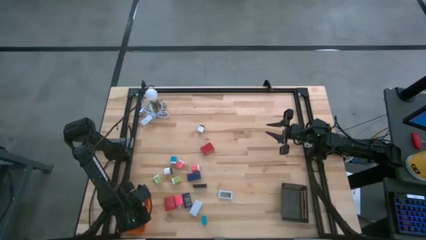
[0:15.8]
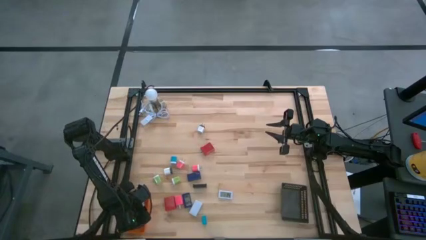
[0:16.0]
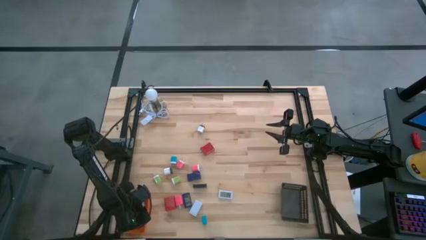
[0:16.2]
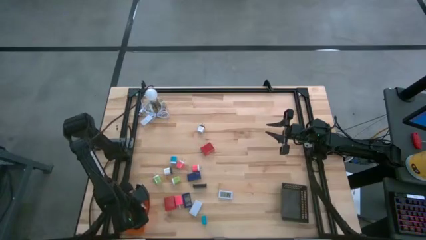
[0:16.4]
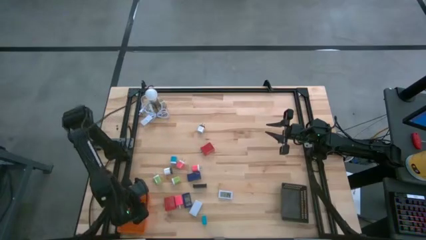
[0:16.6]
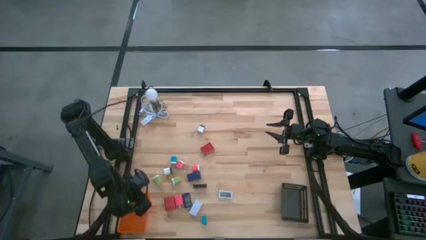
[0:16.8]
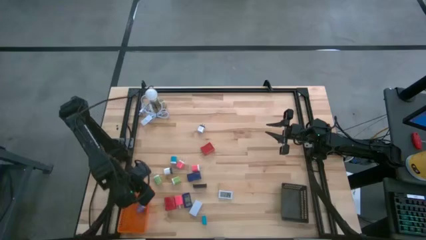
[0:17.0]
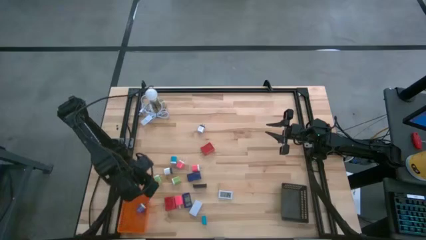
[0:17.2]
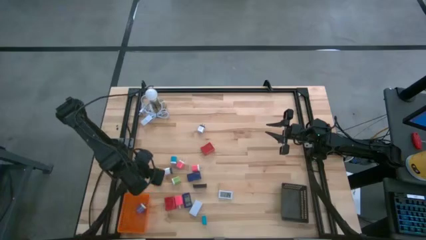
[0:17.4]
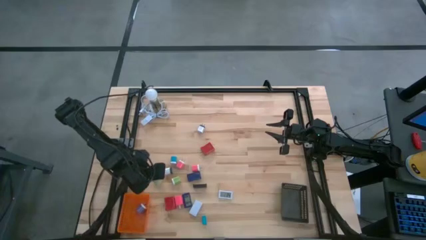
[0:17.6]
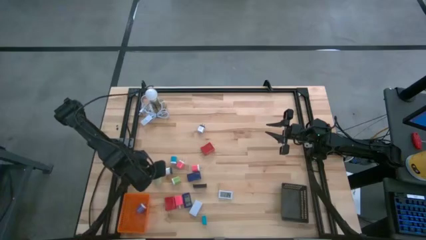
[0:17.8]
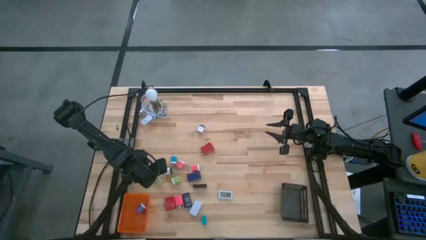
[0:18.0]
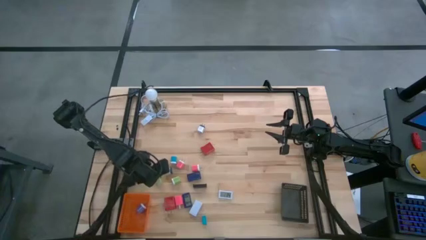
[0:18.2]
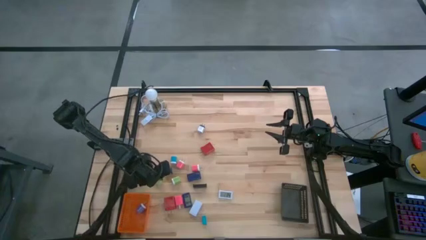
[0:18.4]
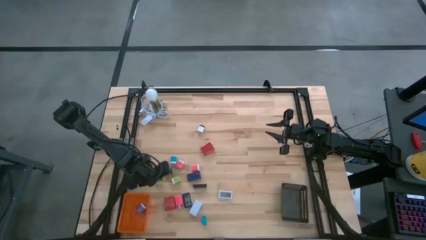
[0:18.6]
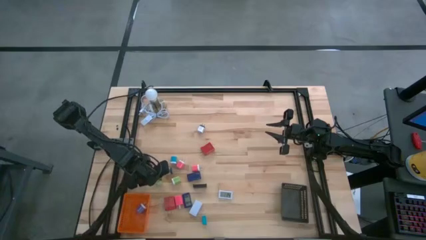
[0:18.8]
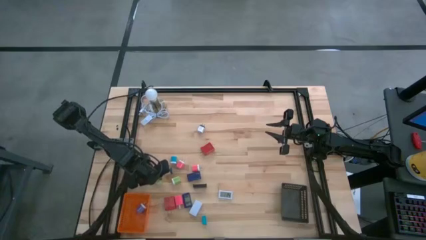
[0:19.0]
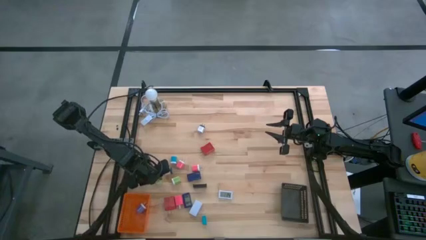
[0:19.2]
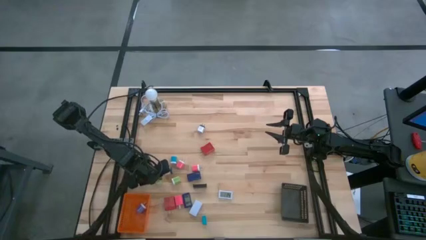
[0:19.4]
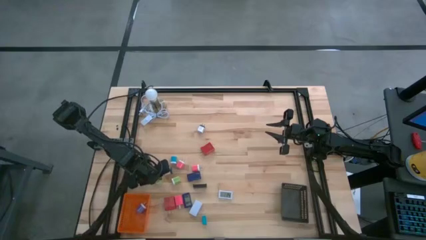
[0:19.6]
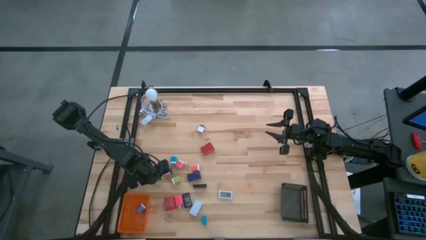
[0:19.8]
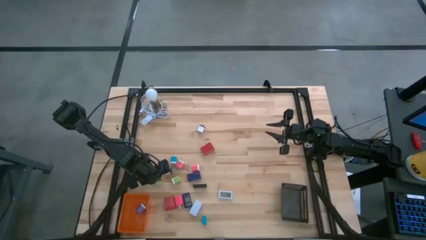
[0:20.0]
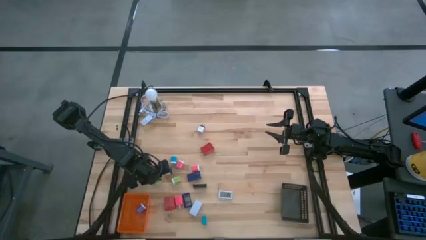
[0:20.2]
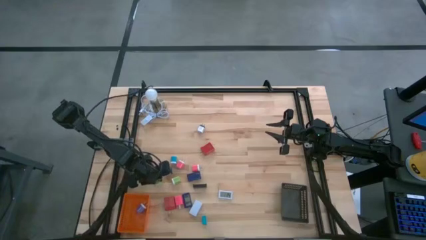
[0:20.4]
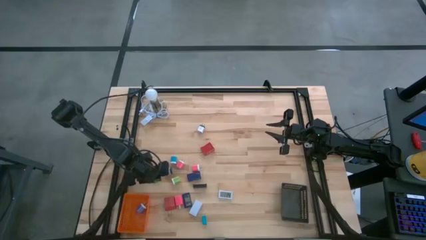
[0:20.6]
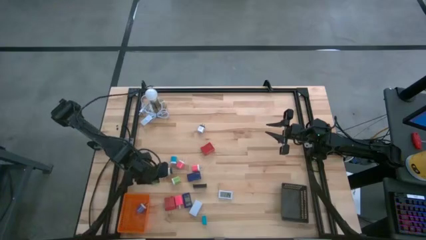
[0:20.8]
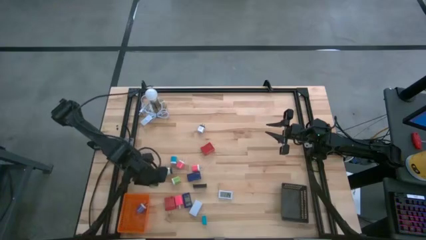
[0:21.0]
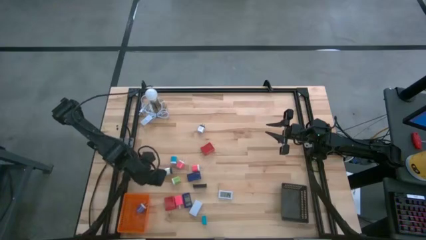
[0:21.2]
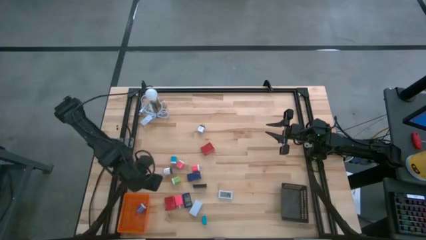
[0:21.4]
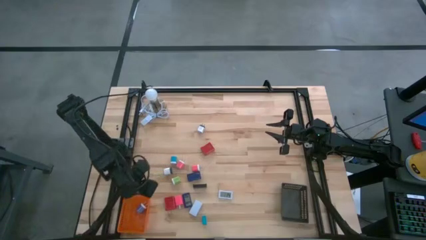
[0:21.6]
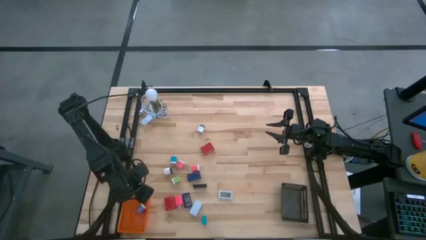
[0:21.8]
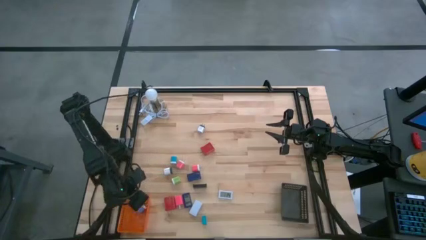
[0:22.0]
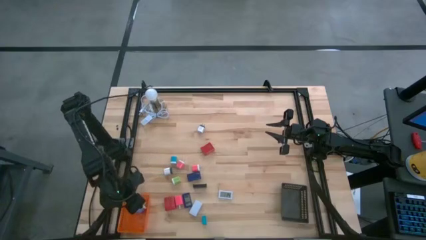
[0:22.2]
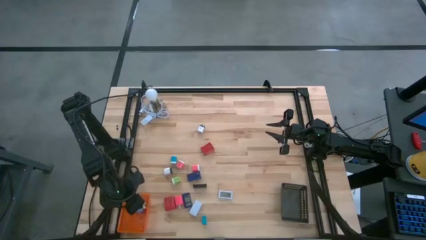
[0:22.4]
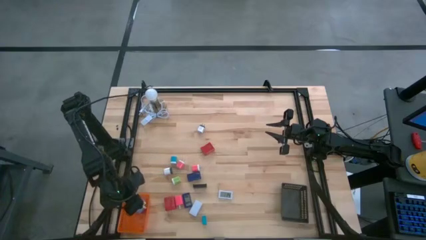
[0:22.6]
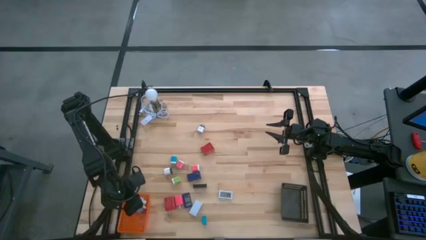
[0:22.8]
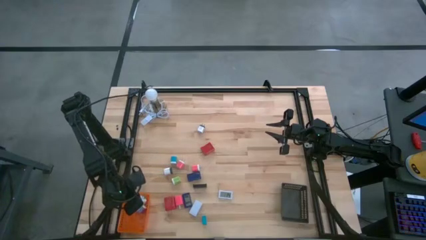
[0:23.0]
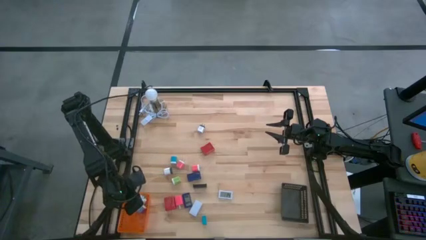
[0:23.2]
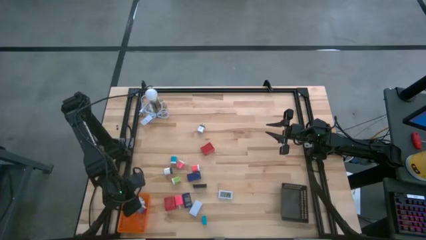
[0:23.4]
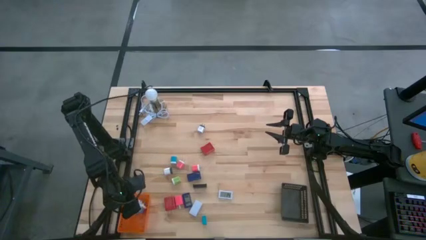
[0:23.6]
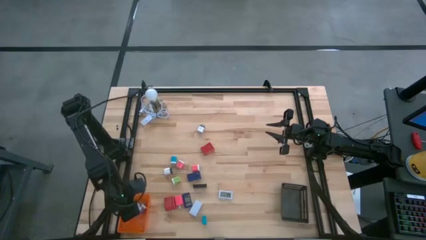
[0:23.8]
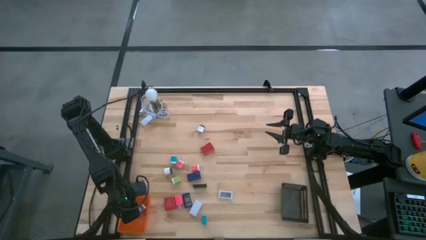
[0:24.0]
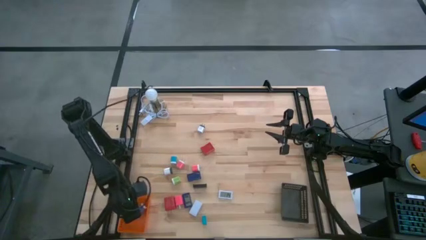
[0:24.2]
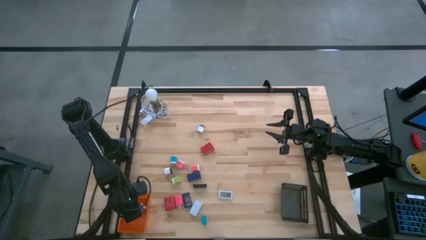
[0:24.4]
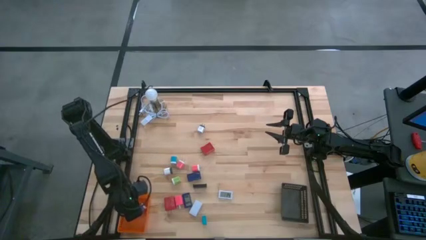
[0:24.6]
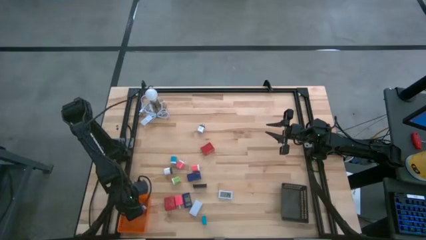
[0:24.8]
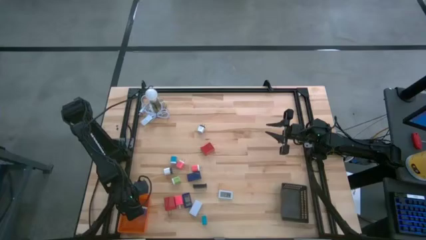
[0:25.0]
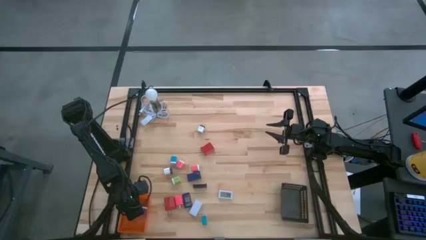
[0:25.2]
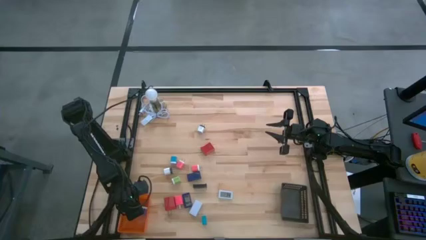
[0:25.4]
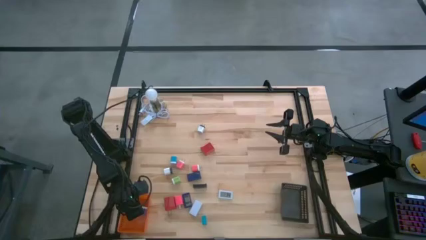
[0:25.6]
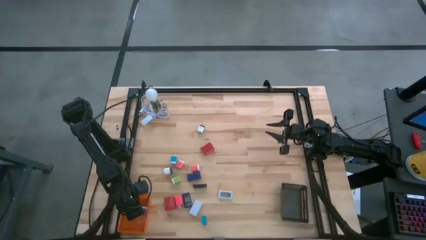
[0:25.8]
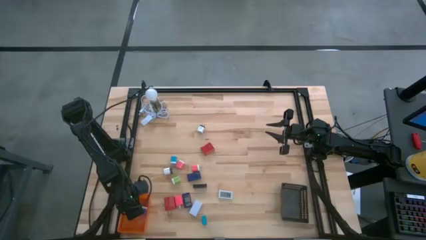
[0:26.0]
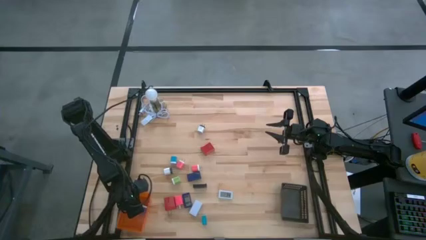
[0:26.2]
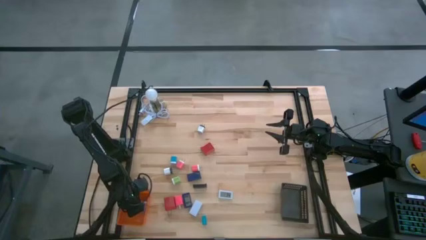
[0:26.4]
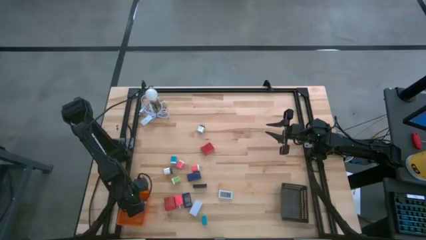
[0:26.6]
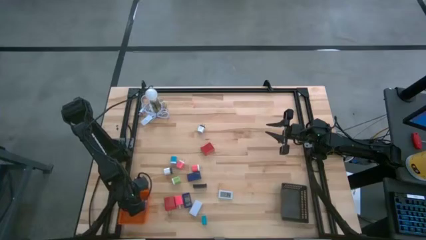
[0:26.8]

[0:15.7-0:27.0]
Task: Pick & Place Office items
Put the left green charger adapter into the orange bin
